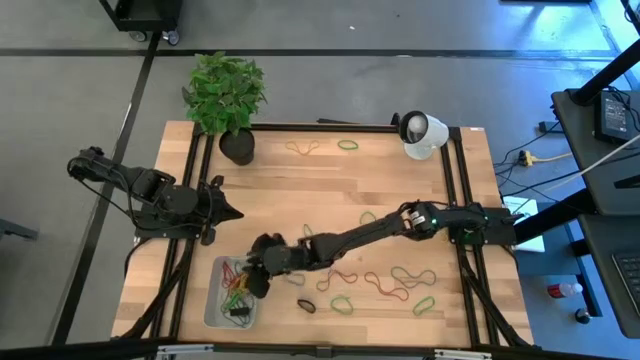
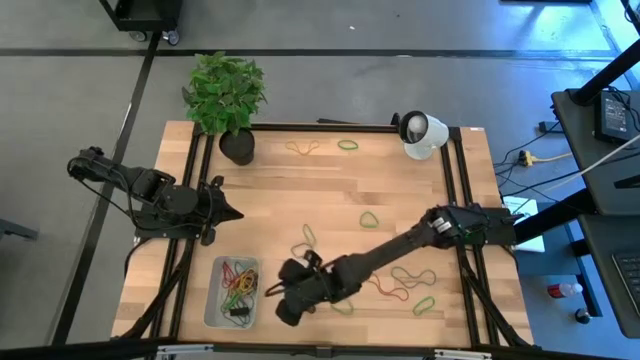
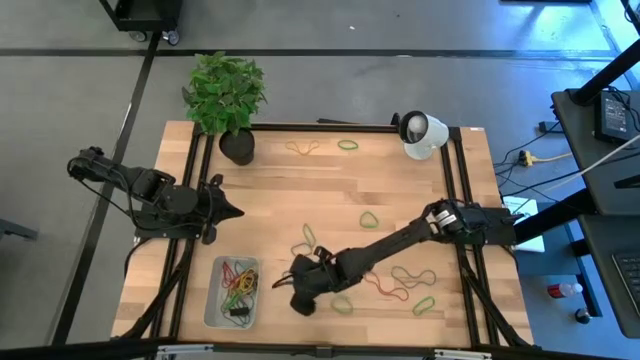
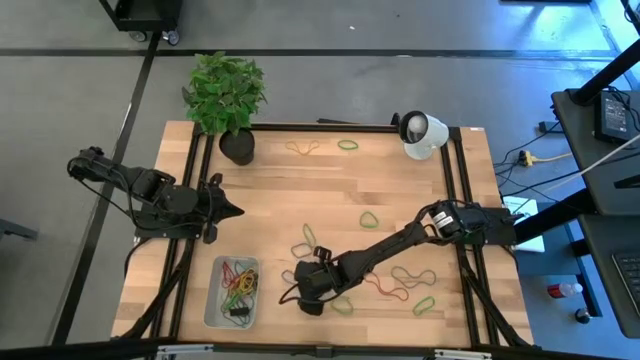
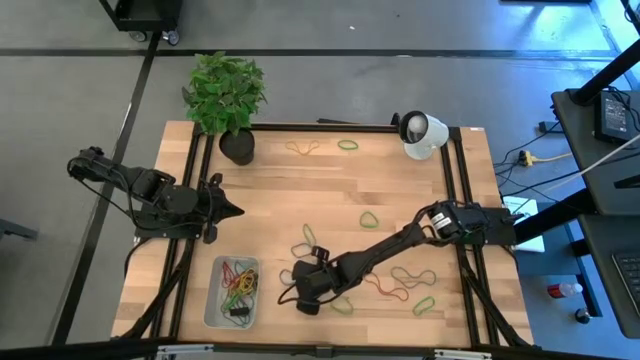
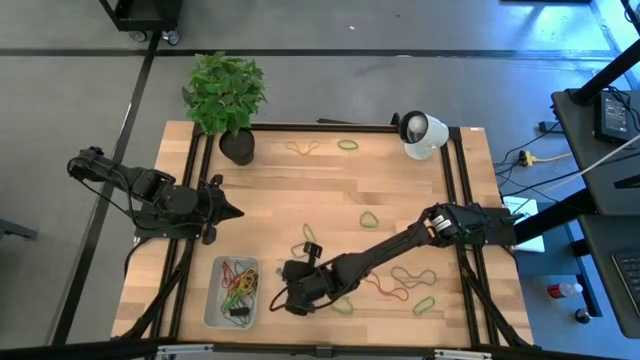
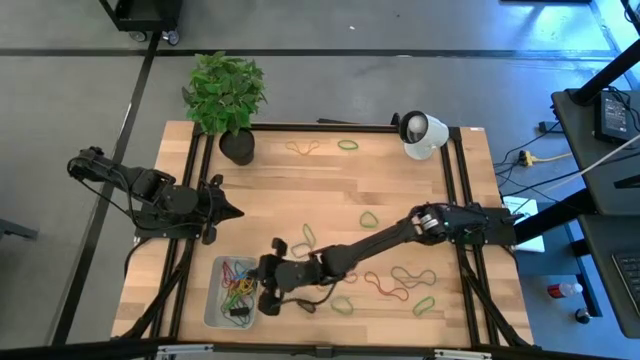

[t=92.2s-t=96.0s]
Task: Pick and place rubber bands into bin
Put the blue rubber band into the bin

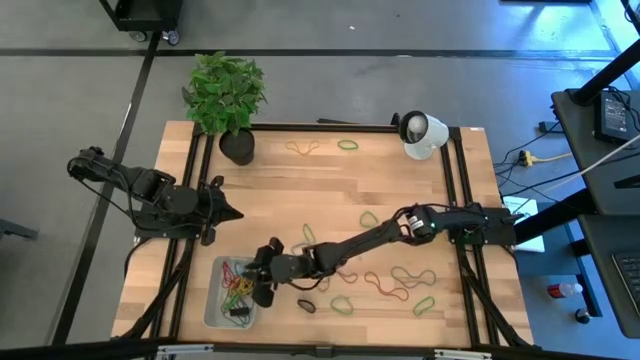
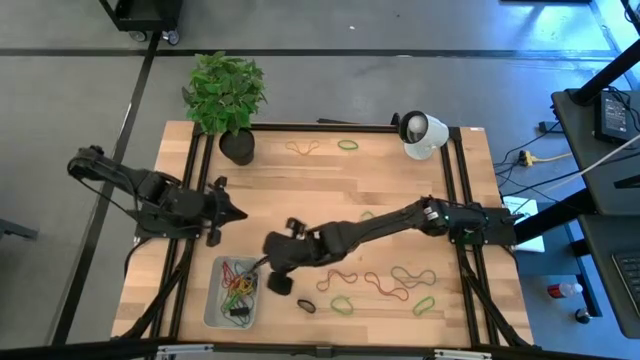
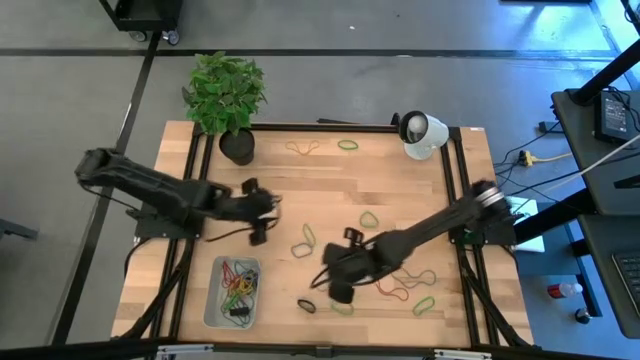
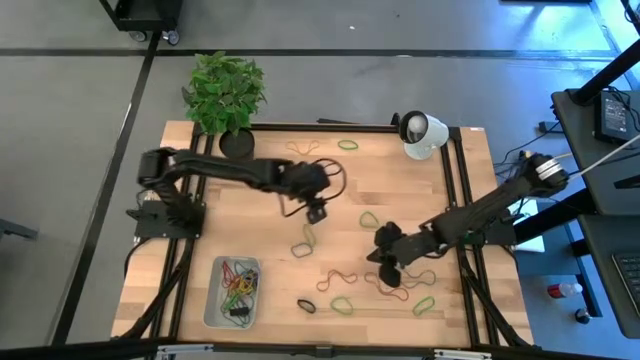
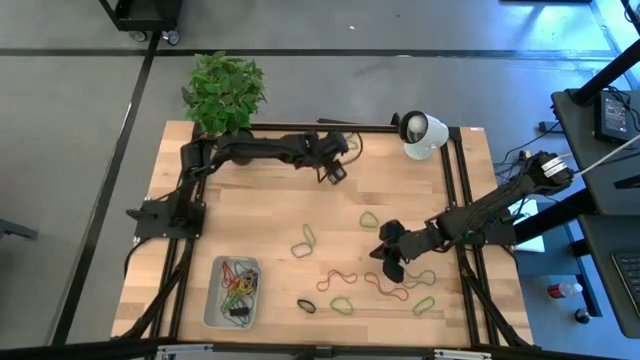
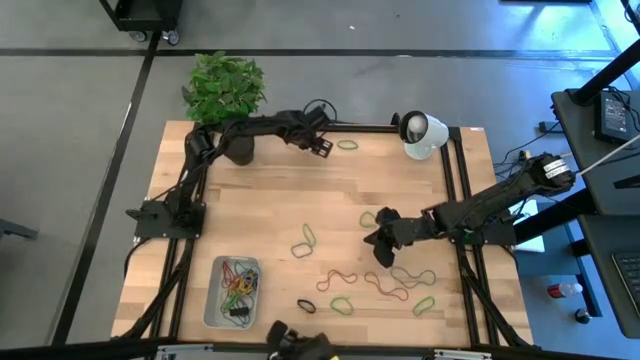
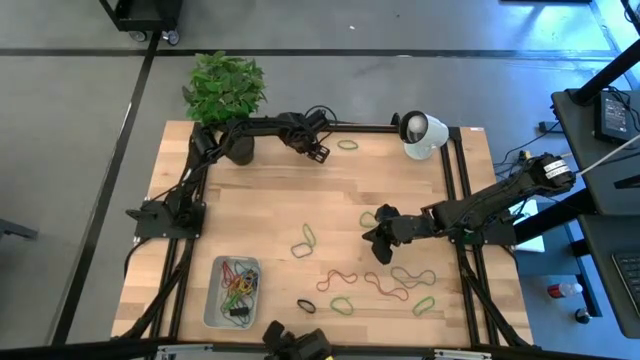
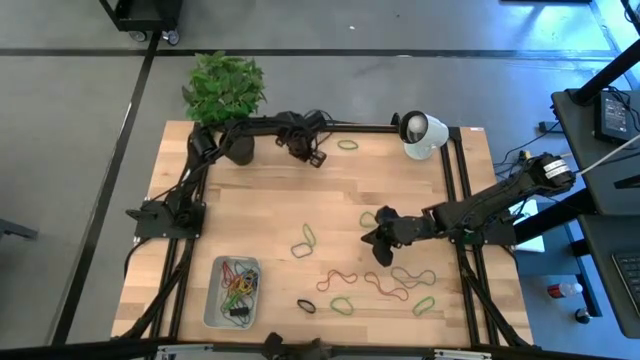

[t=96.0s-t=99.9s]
Put the yellow rubber band into the bin

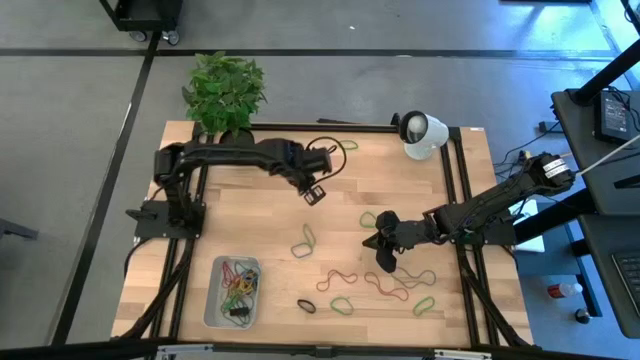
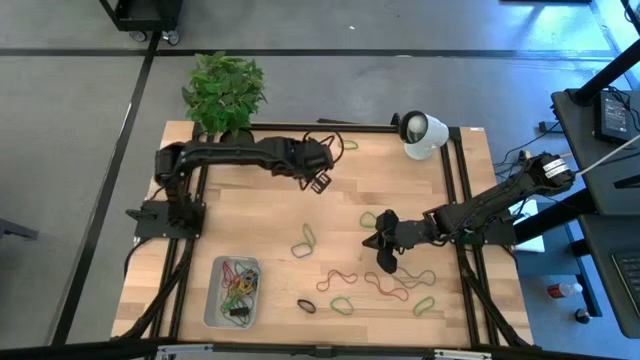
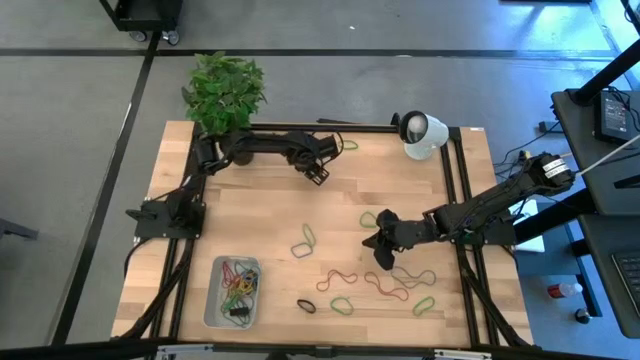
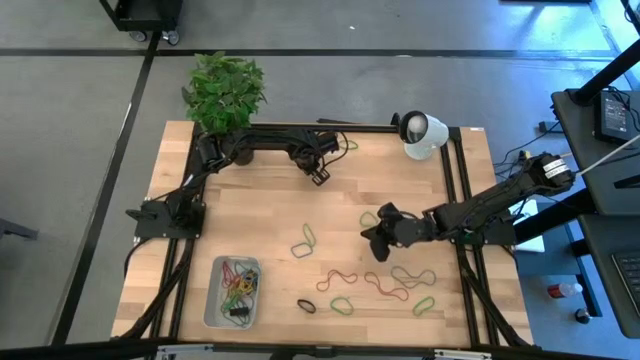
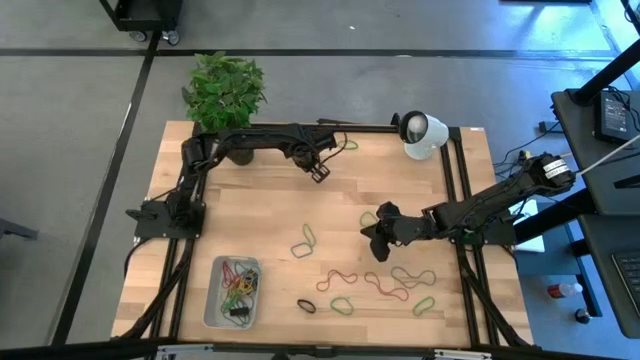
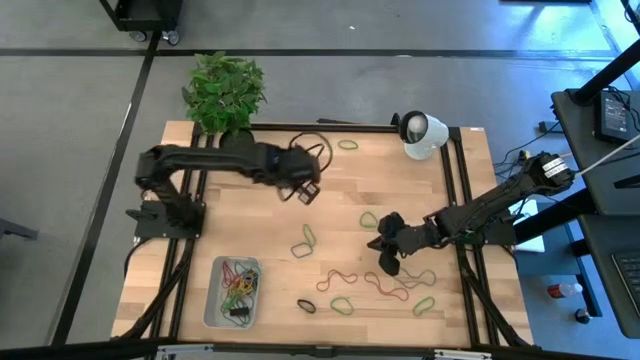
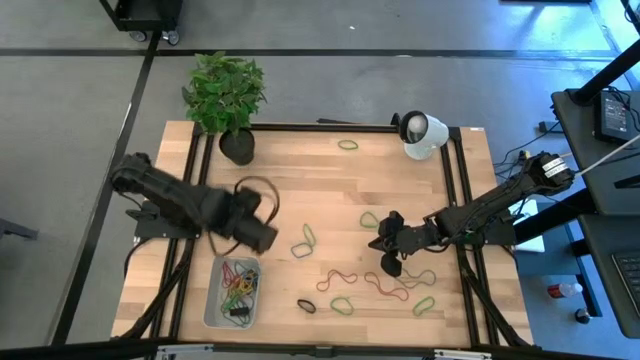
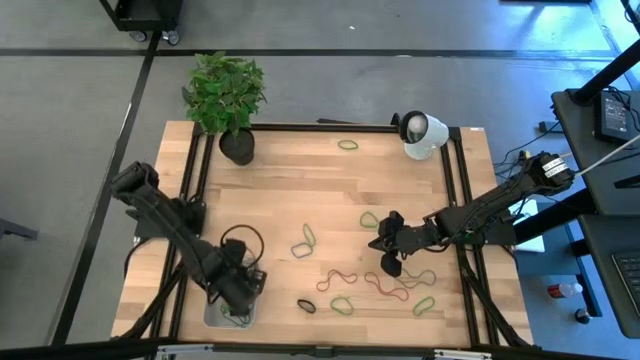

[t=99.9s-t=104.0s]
Put the yellow rubber band into the bin

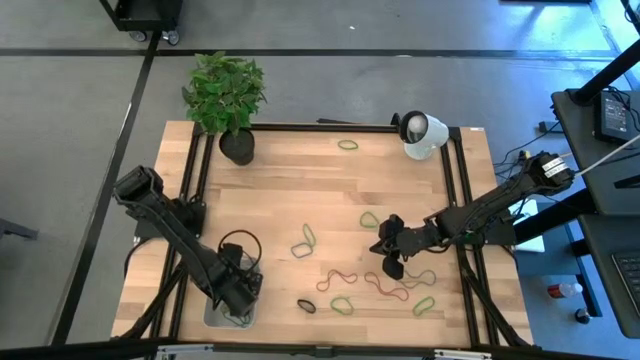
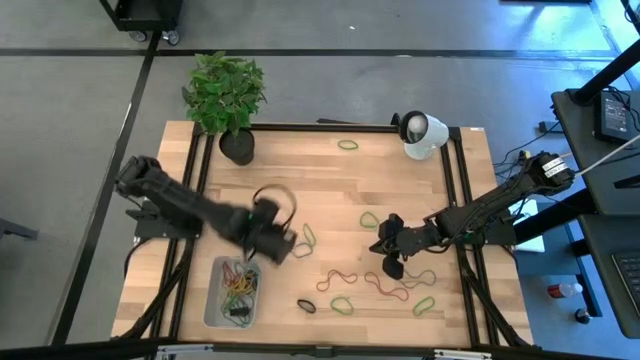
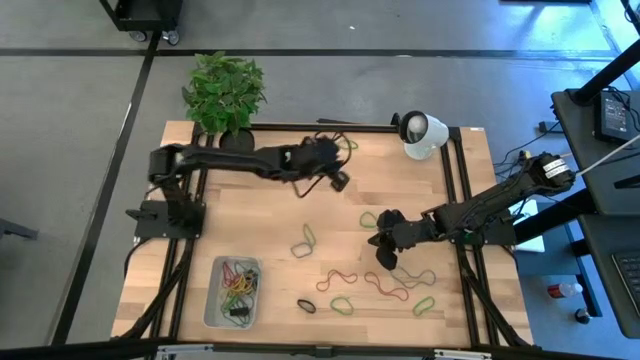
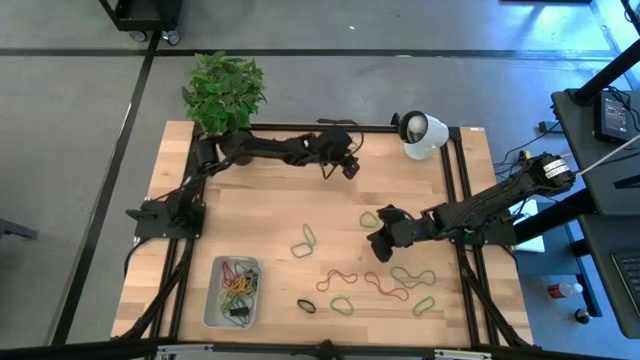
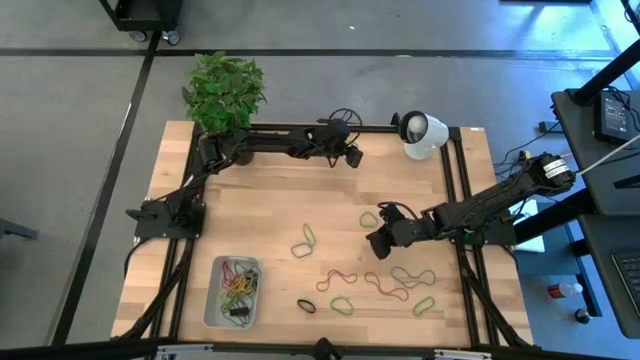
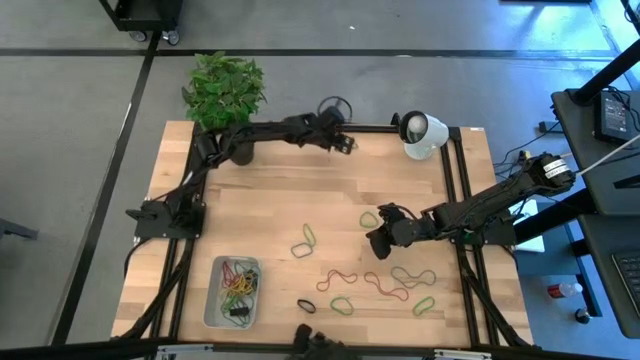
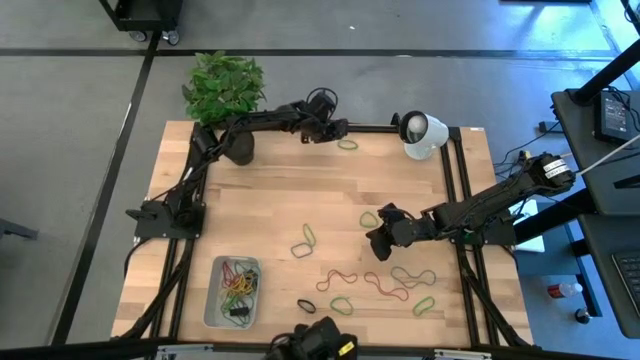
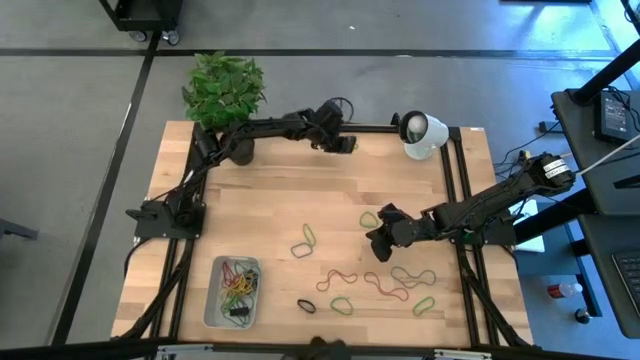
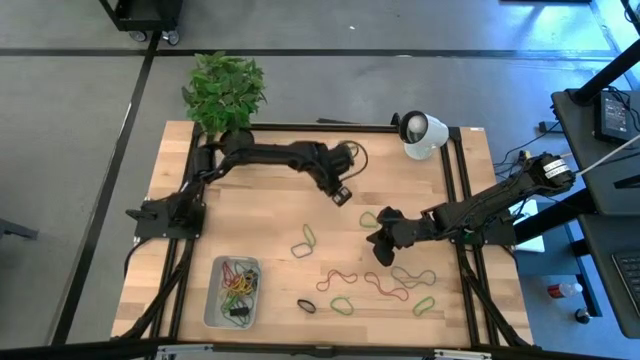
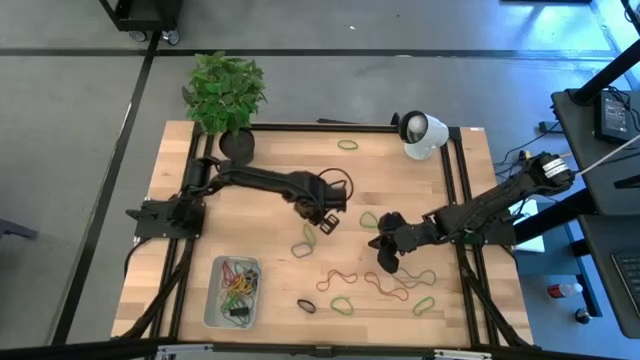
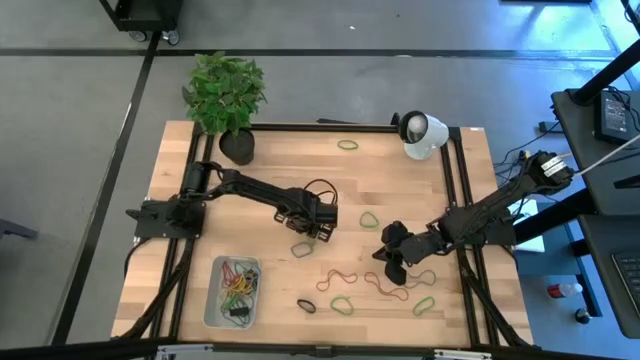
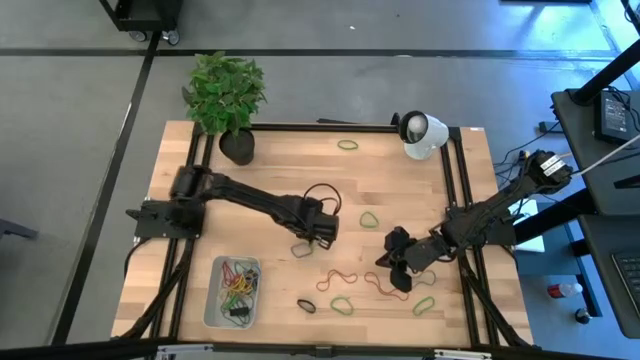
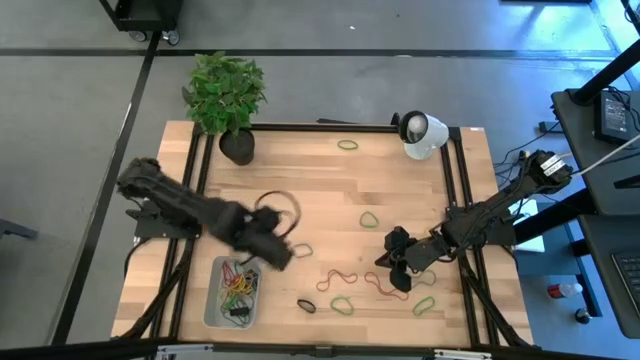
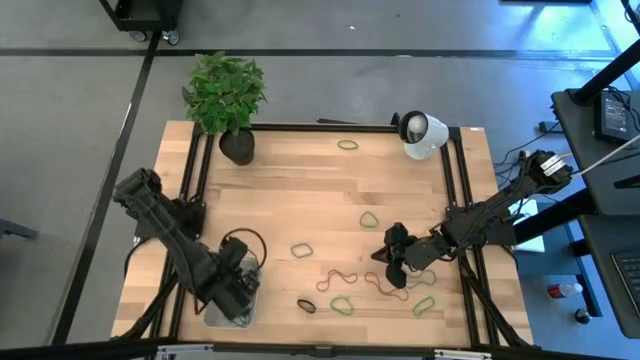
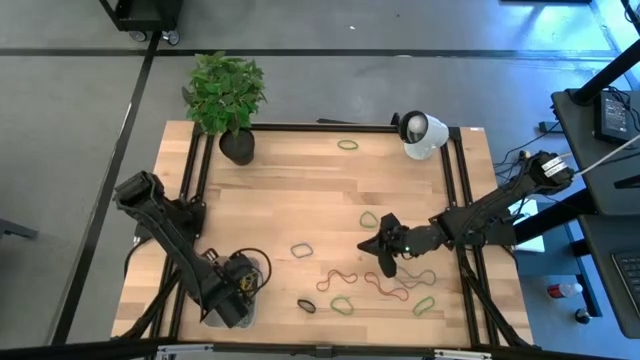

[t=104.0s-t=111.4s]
Put the green rubber band into the bin

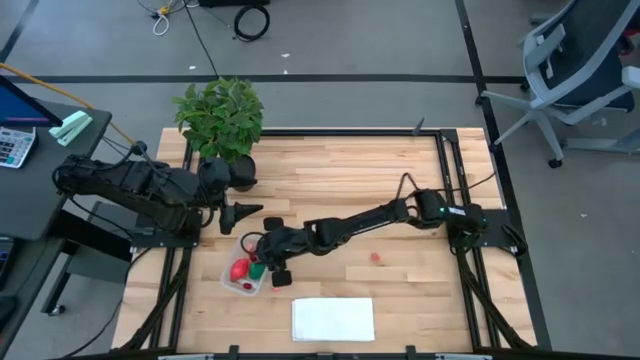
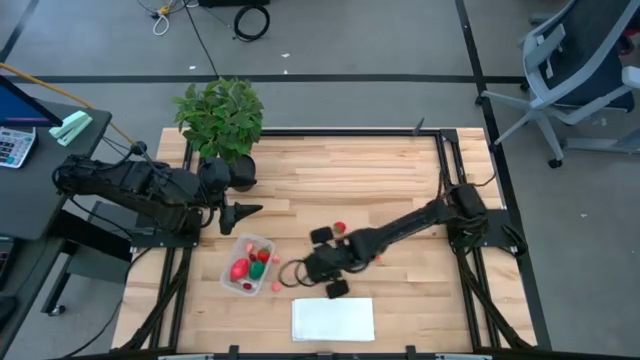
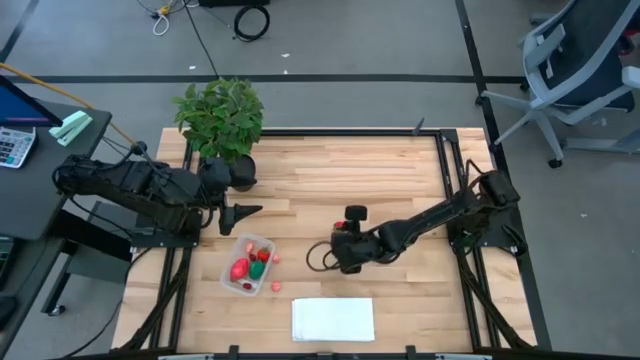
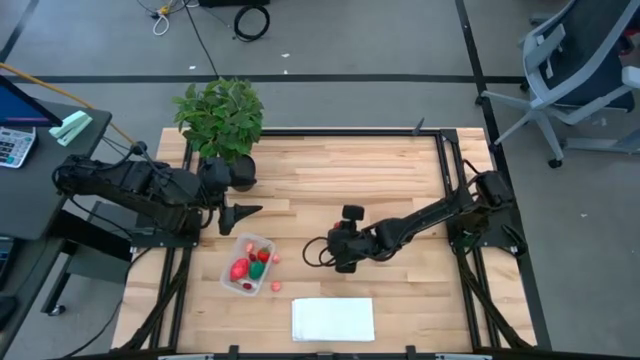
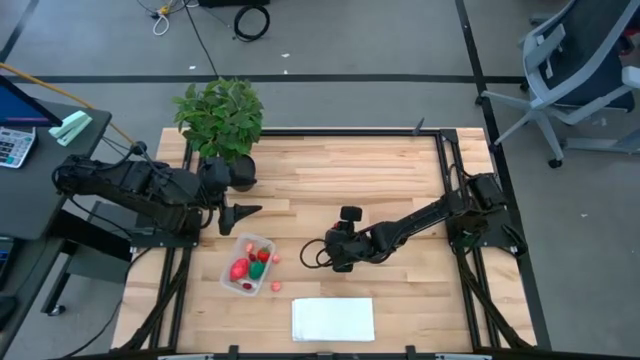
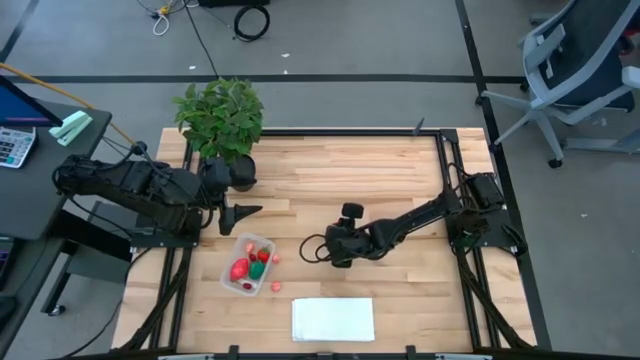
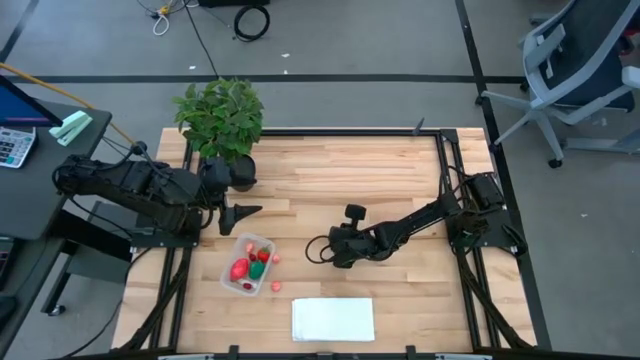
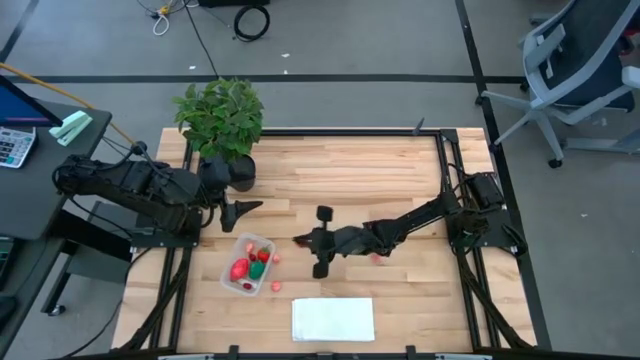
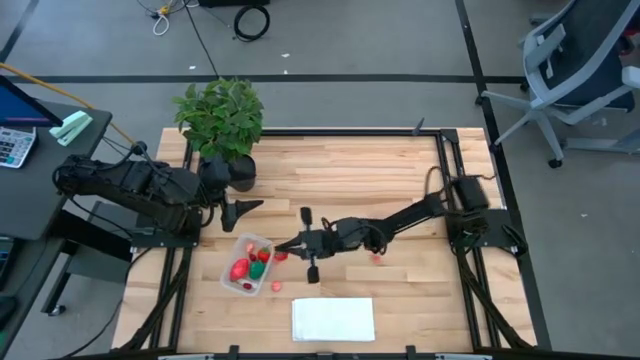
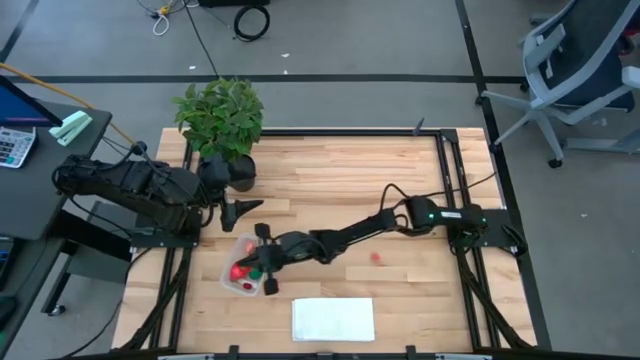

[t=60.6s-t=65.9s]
Task: Pick and placing Produce into tupperware
Put the red strawberry into the transparent bin
